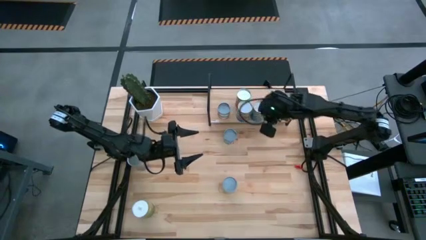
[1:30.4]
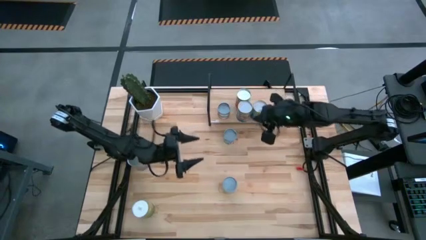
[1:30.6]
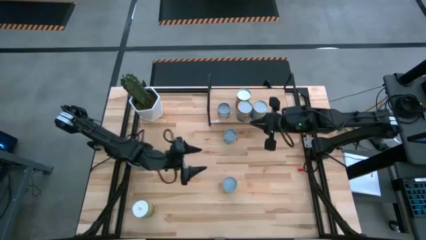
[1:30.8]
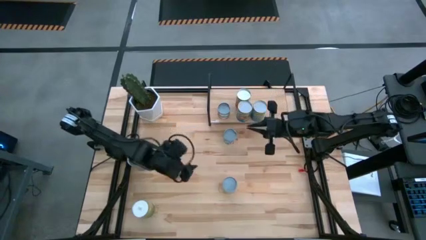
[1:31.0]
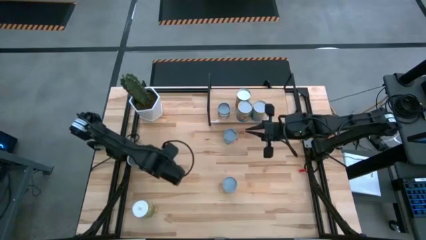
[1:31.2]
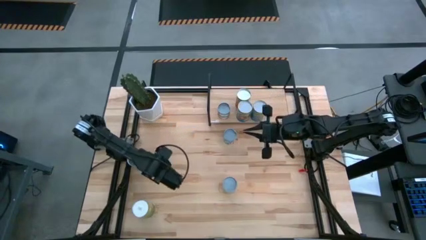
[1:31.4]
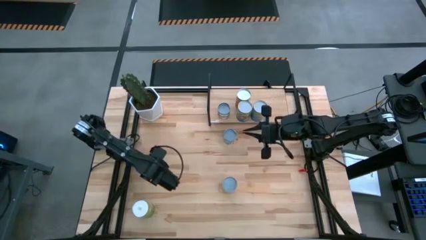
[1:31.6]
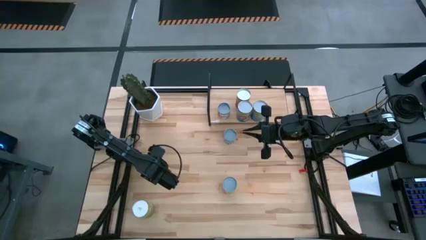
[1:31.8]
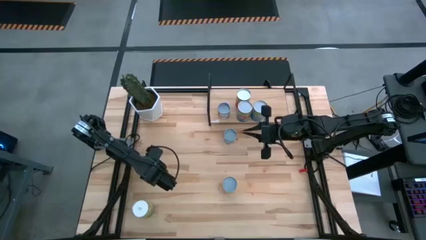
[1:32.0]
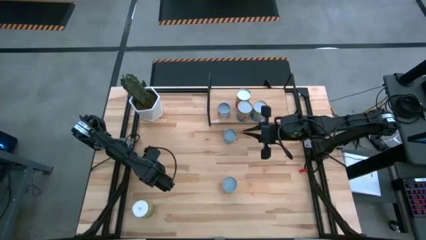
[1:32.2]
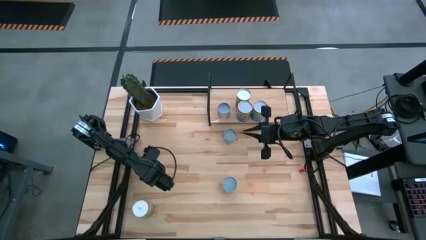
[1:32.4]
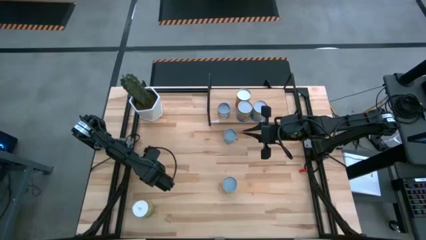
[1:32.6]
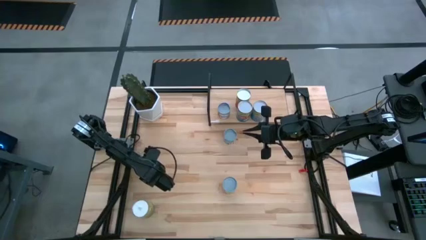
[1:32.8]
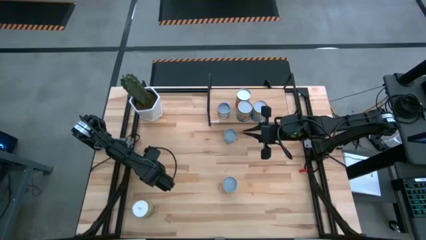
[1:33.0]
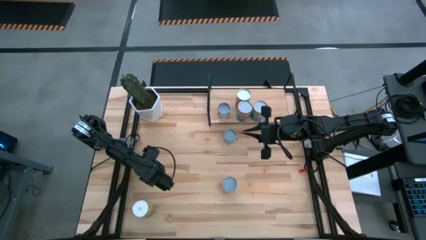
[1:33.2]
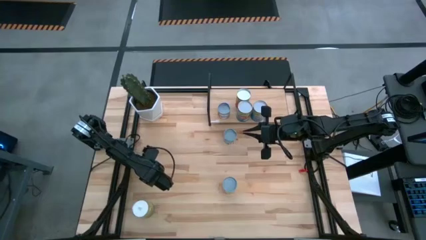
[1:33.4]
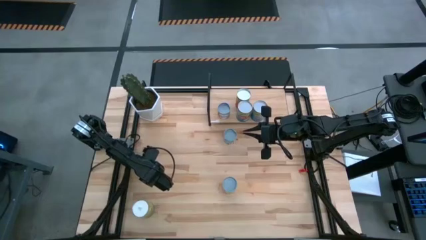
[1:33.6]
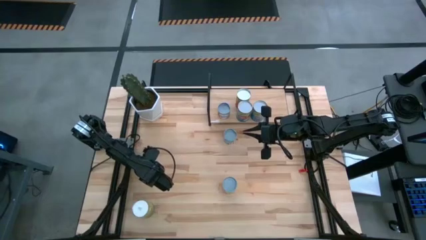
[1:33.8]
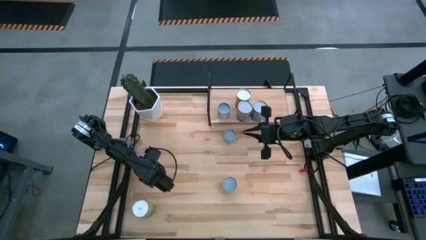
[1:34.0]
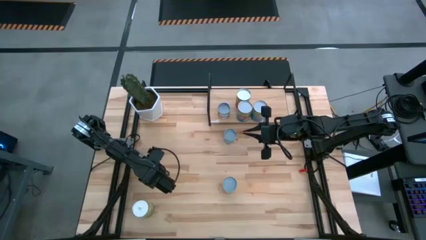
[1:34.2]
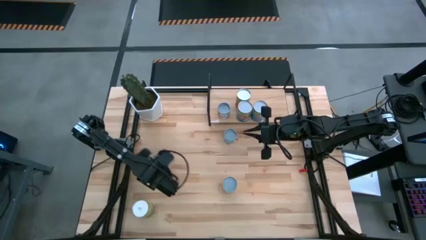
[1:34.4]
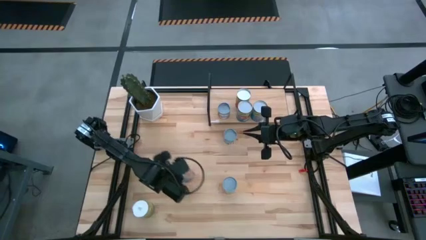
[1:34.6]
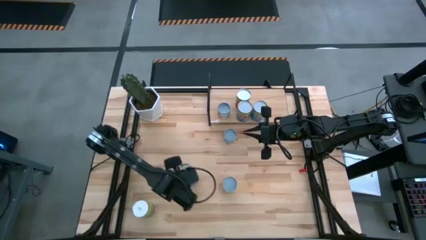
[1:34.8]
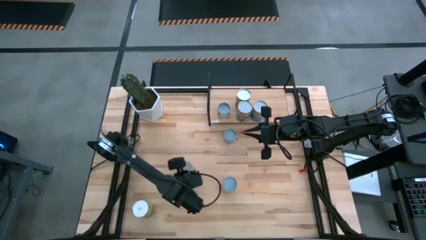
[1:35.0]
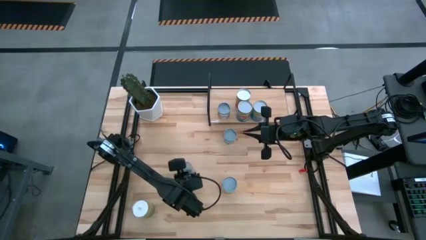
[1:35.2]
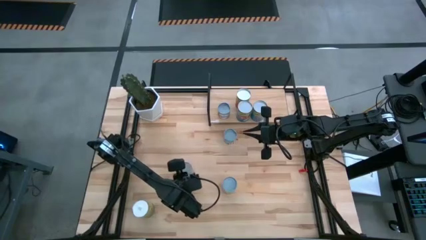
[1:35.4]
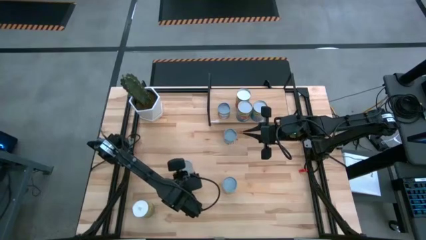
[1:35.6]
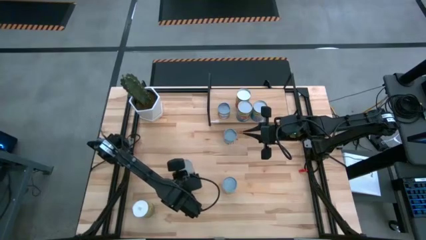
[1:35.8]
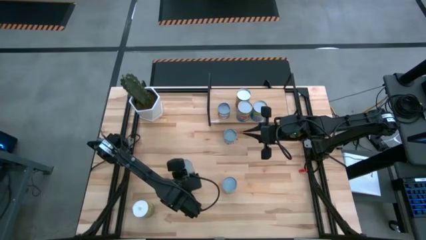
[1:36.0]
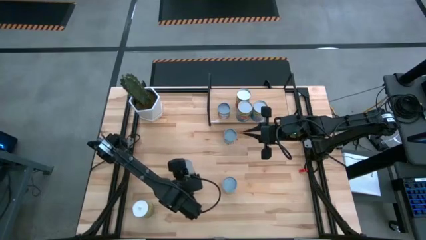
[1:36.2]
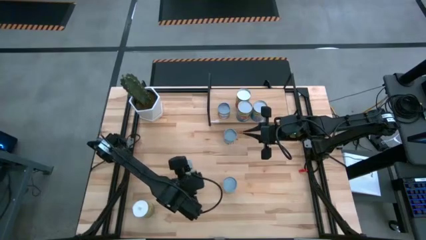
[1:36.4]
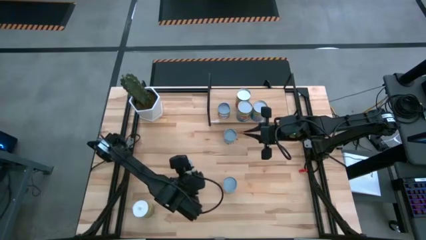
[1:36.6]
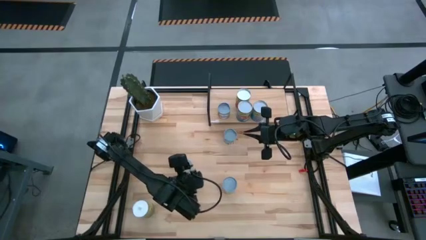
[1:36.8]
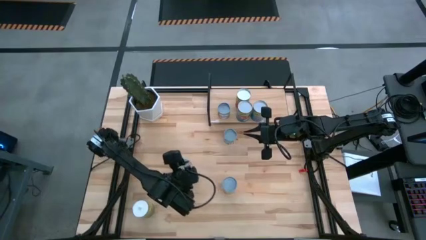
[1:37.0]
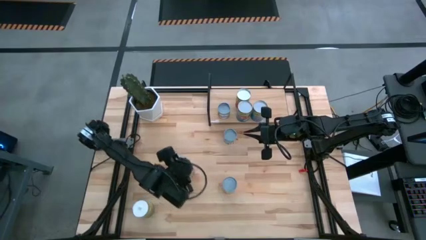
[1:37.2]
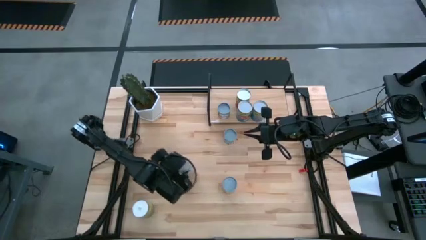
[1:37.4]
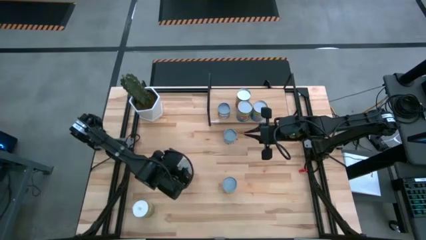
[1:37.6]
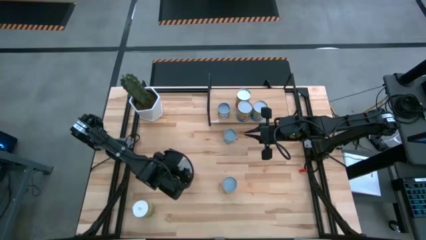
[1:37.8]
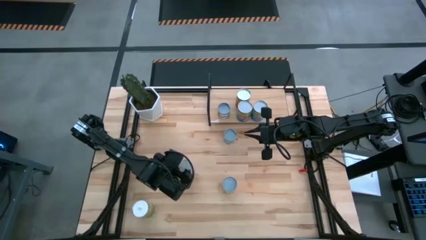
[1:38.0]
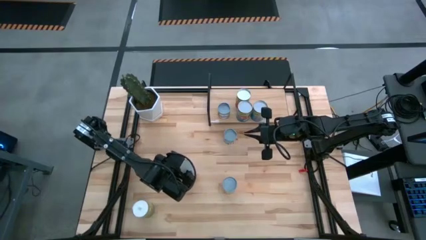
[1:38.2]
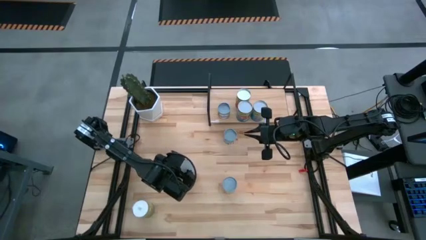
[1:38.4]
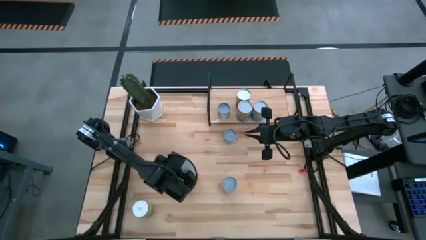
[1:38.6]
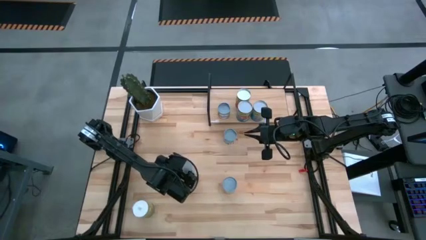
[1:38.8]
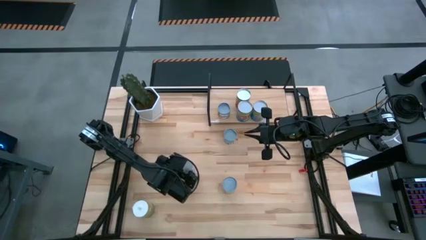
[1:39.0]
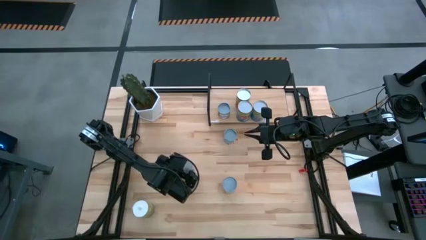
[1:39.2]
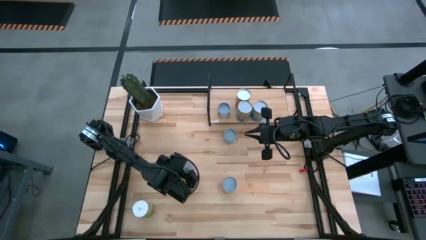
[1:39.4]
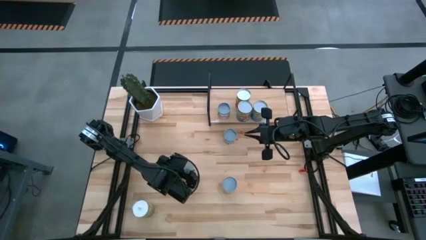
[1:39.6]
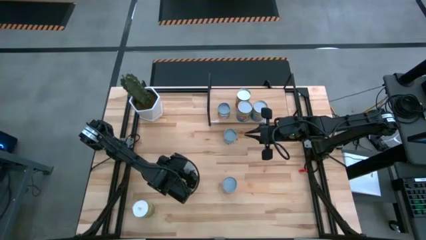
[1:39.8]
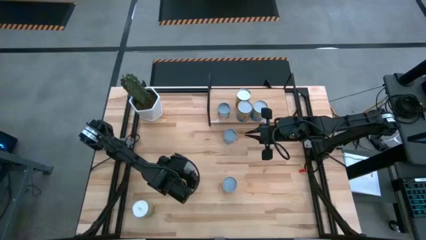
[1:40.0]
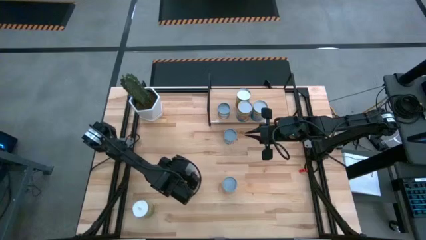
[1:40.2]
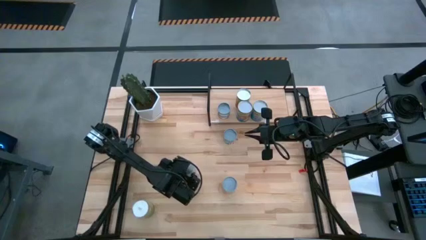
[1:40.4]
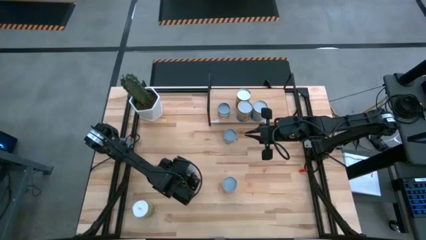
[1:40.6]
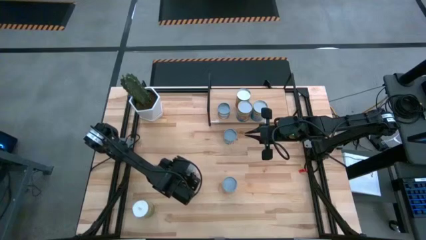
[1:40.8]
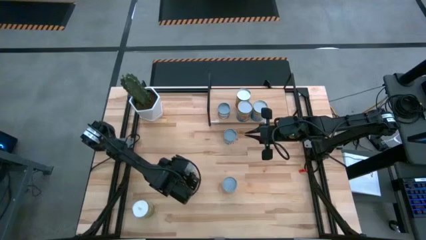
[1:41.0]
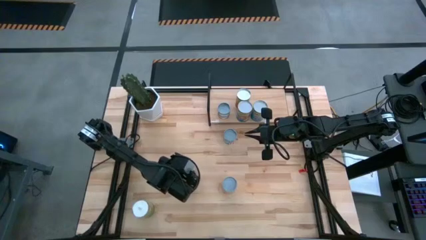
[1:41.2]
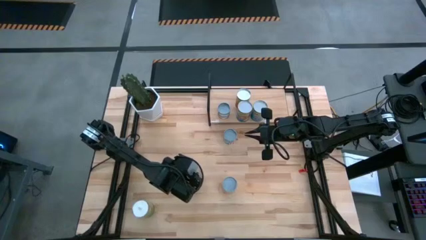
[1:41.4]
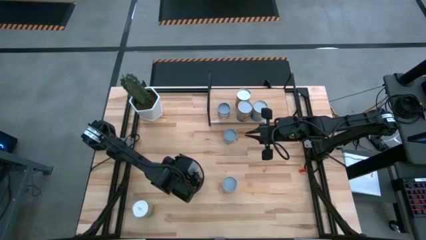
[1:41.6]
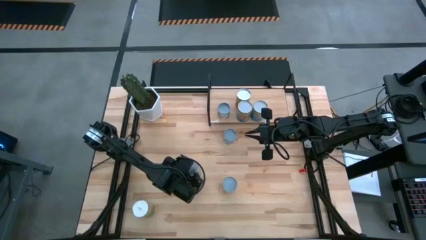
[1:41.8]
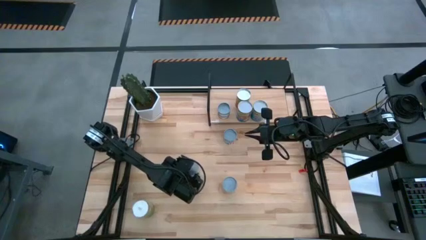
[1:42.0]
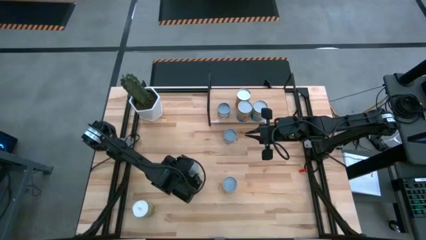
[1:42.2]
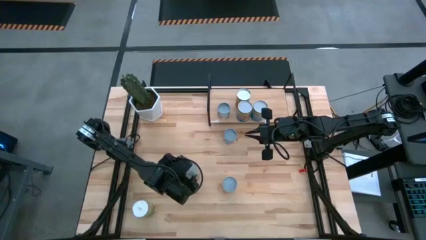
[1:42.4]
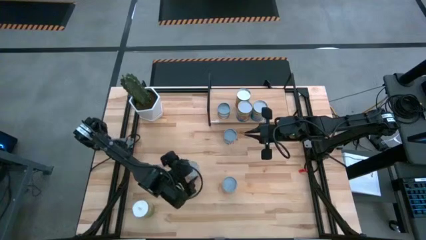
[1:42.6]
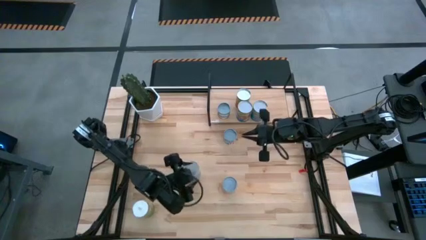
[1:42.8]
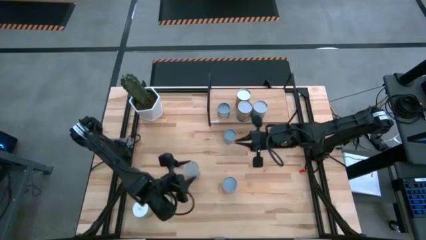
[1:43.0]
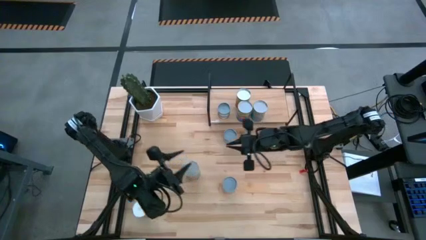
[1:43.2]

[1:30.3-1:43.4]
Task: Pick and place cans onto a shelf
Put the canned peaches on the shelf
